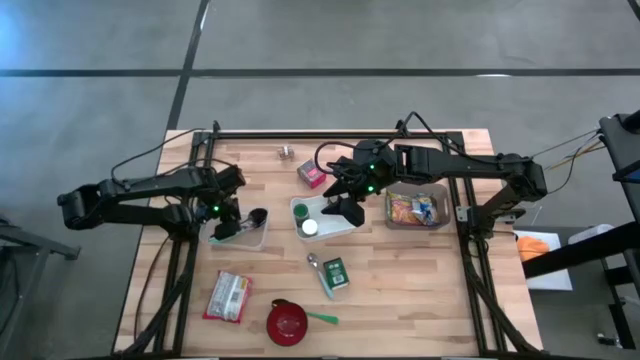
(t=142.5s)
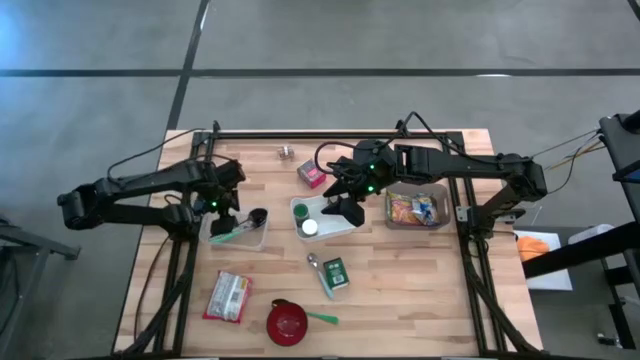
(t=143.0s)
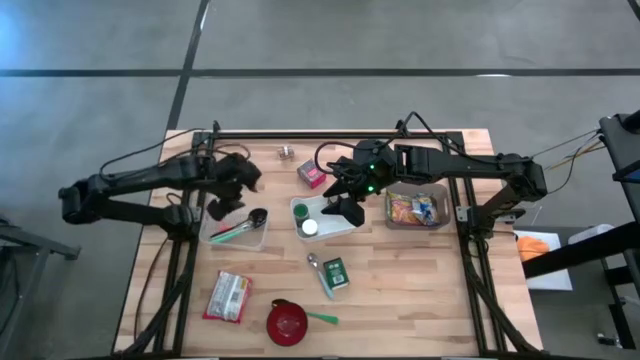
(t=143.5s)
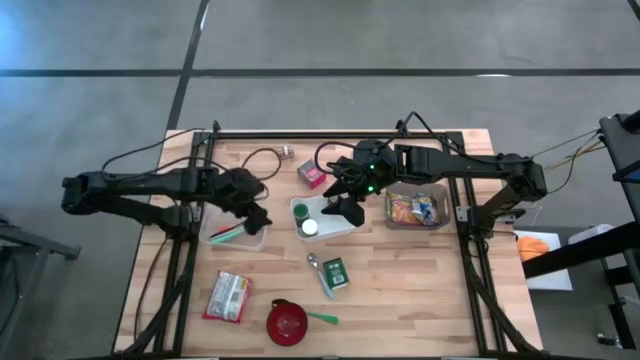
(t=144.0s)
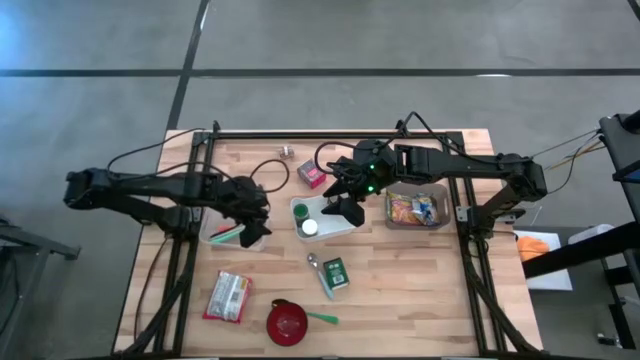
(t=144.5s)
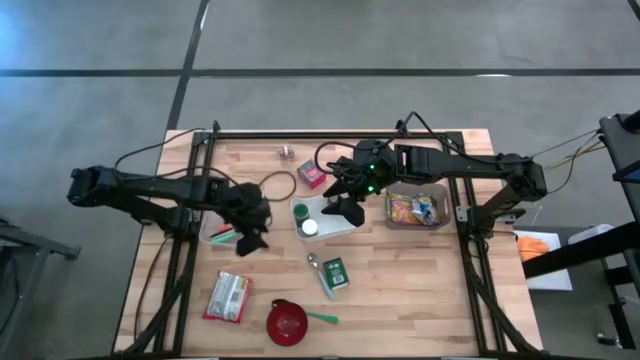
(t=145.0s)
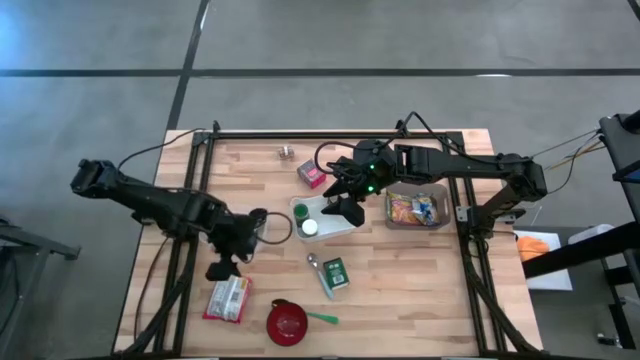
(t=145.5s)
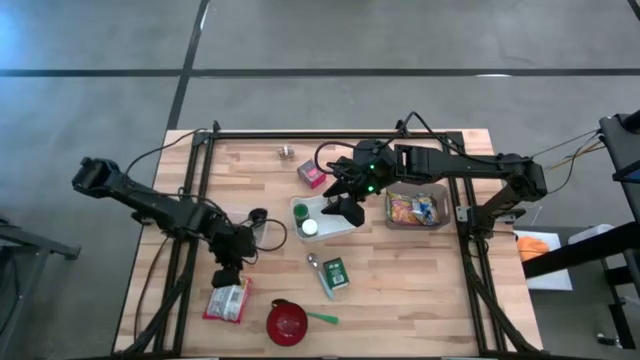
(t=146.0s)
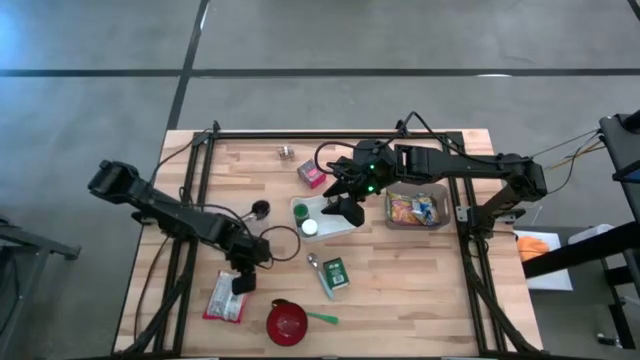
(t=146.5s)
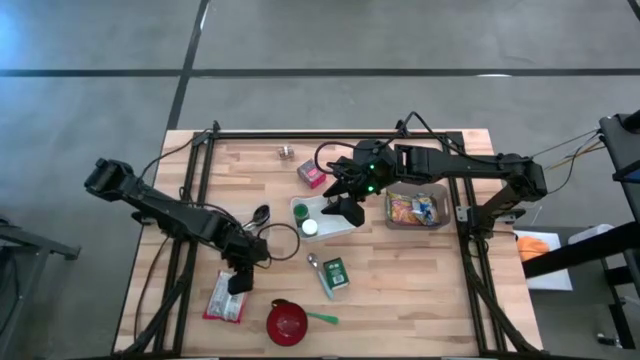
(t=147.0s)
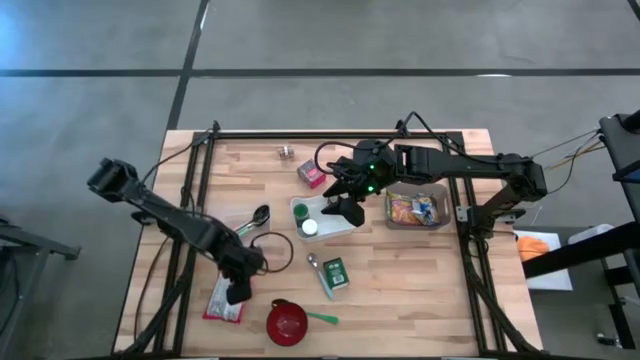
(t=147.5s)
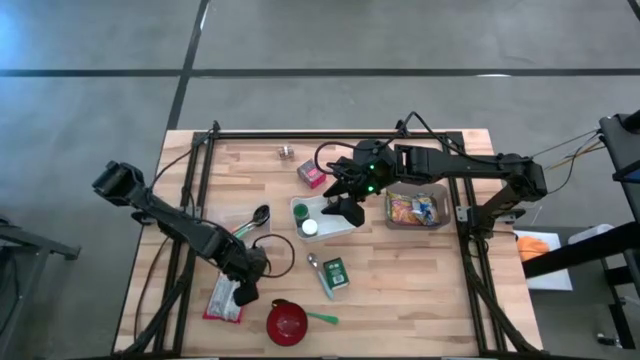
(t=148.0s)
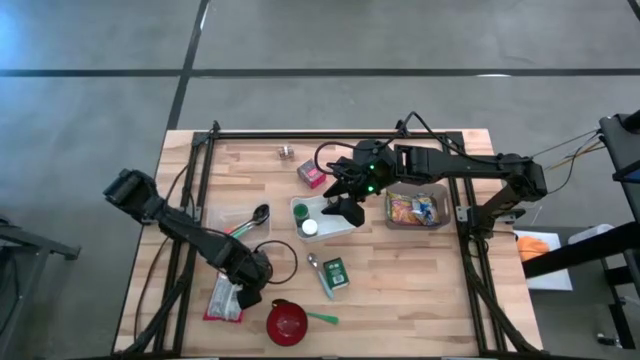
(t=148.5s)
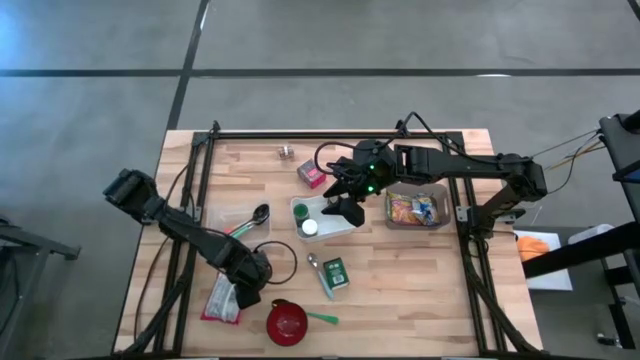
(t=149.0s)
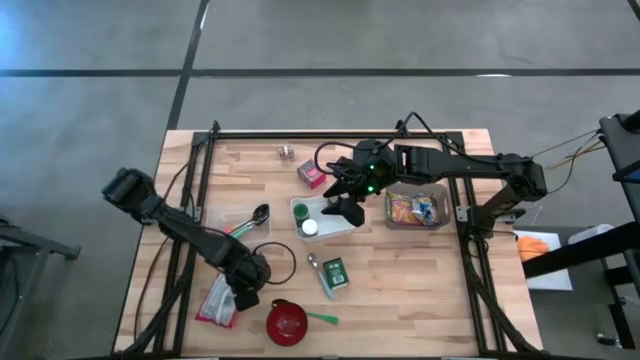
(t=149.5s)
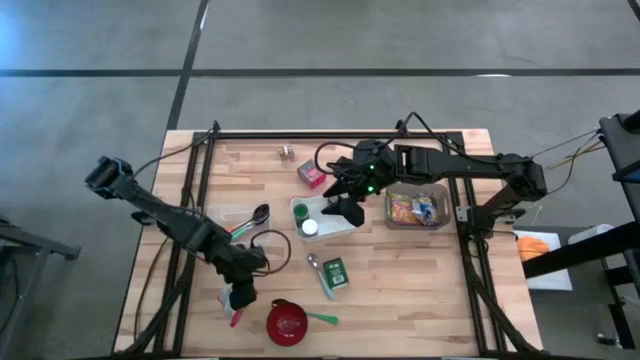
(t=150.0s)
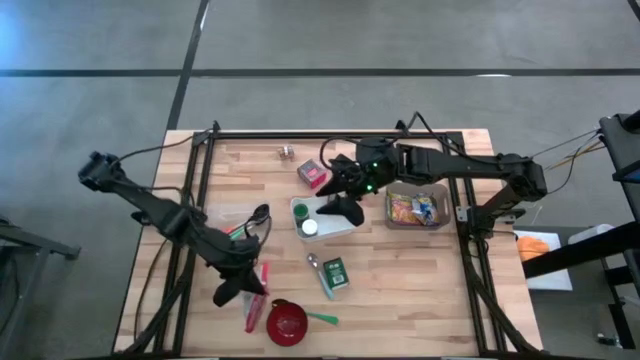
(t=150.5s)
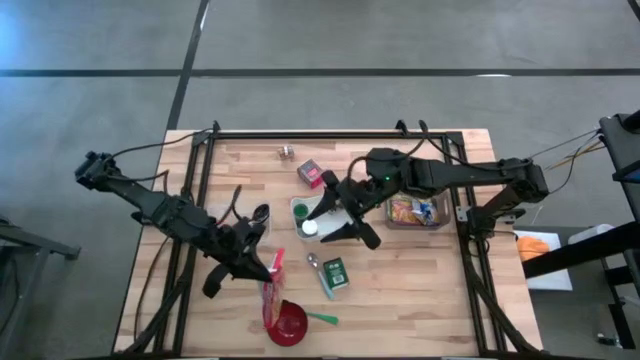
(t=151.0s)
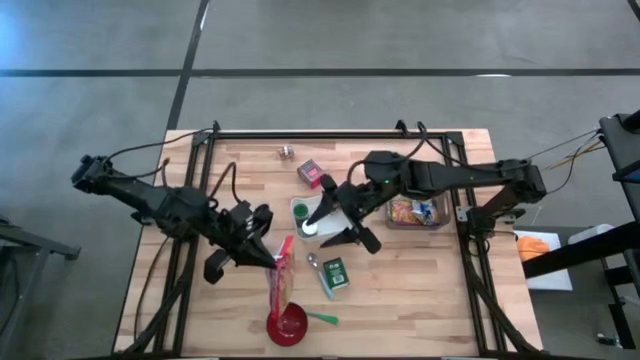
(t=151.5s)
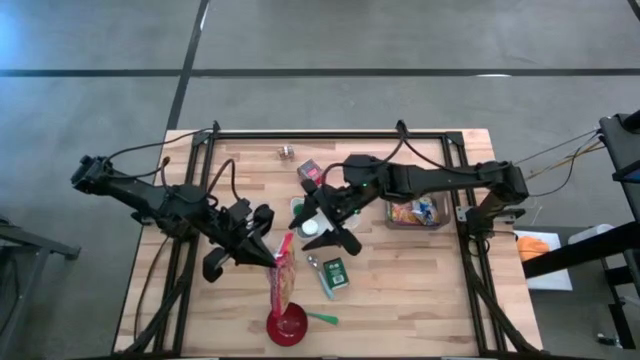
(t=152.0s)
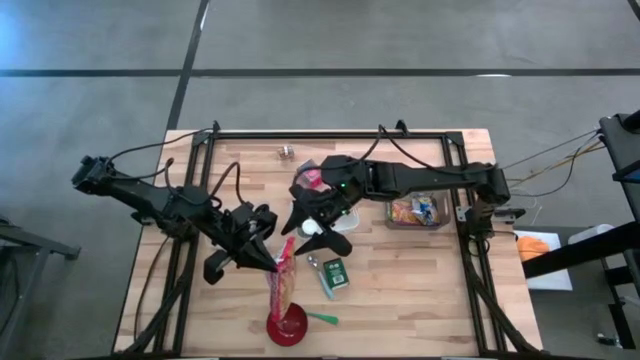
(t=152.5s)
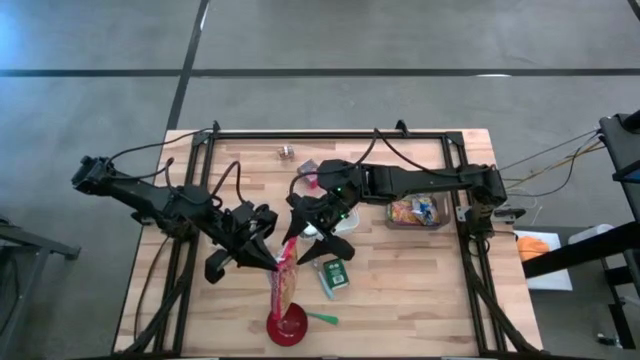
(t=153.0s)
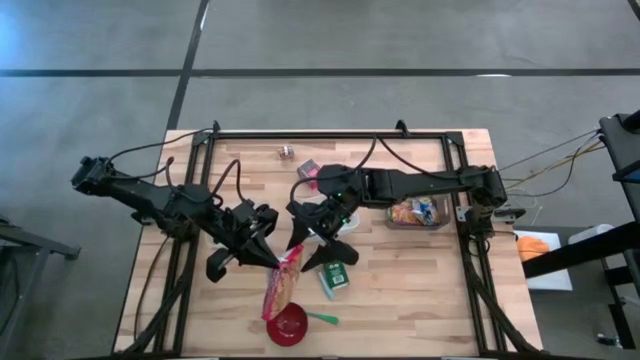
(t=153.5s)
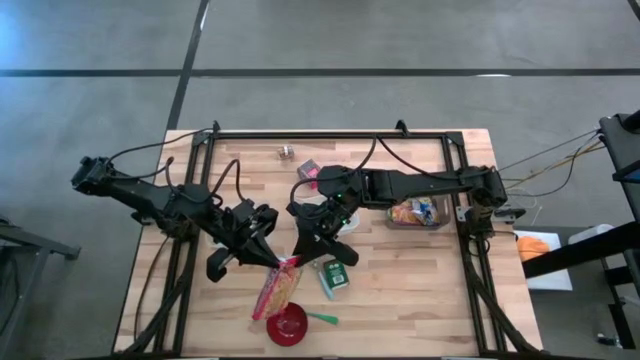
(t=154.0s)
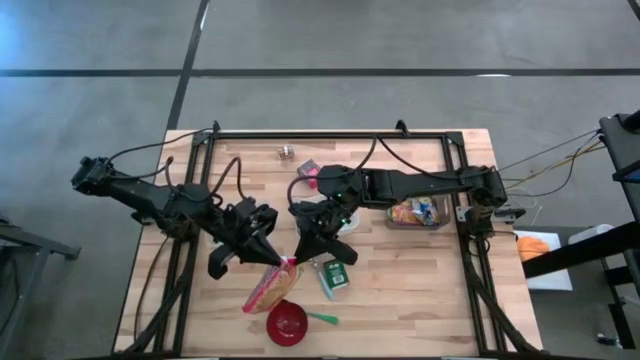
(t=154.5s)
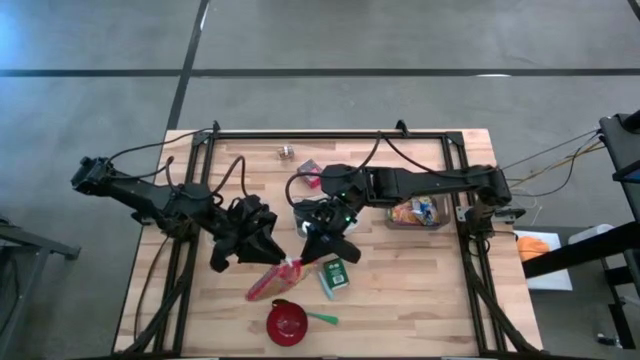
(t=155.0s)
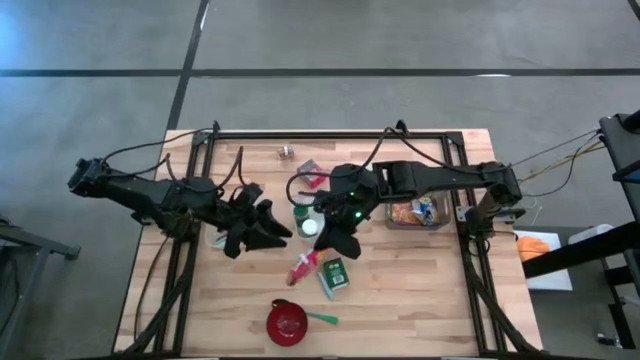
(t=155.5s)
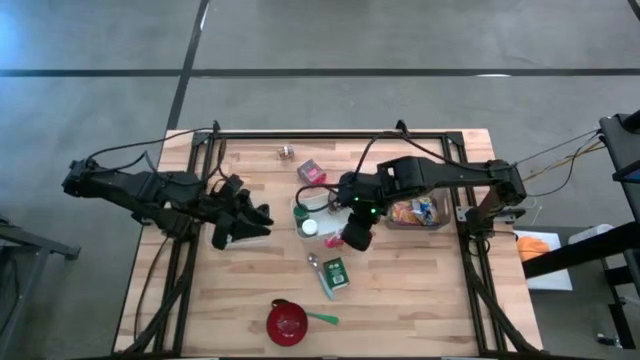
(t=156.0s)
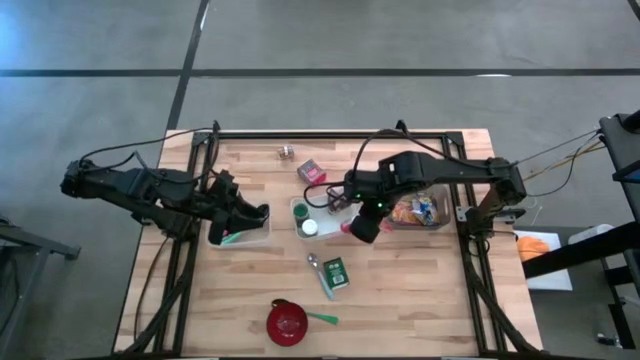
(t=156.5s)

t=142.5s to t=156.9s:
Put the red noodle pack into the black bin

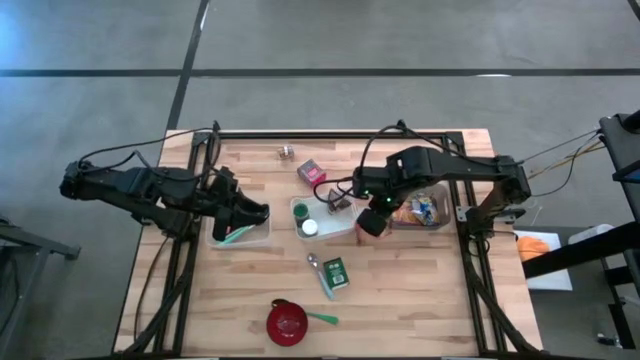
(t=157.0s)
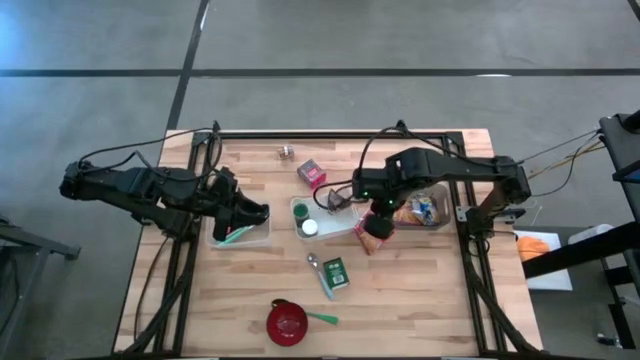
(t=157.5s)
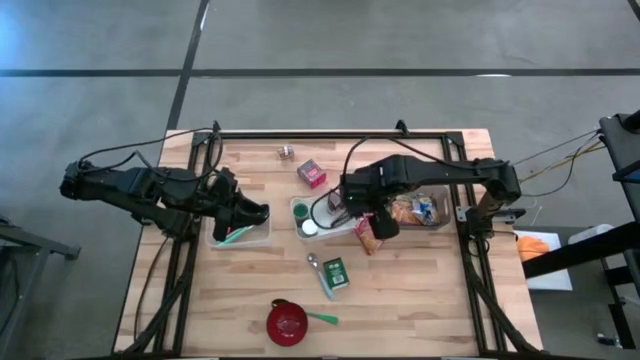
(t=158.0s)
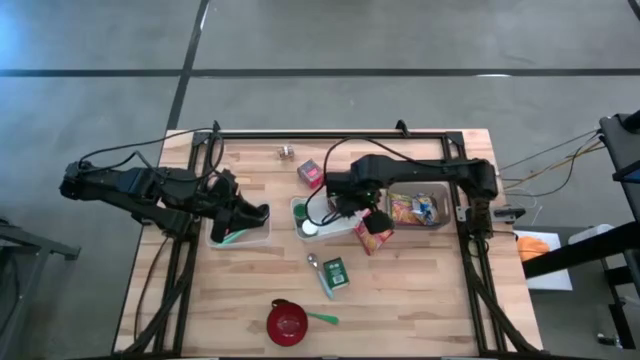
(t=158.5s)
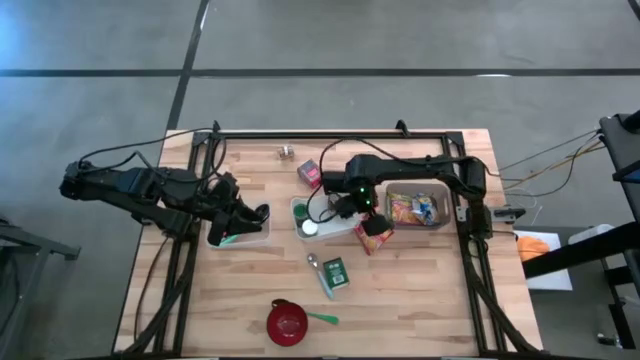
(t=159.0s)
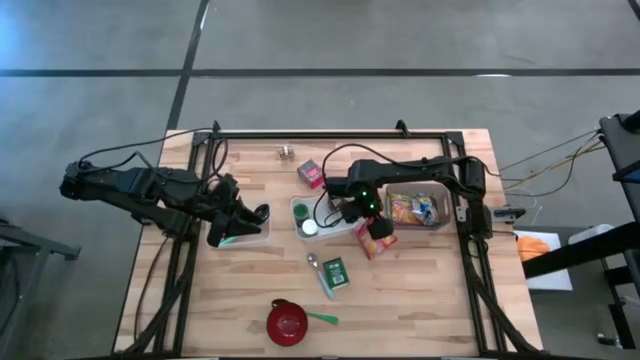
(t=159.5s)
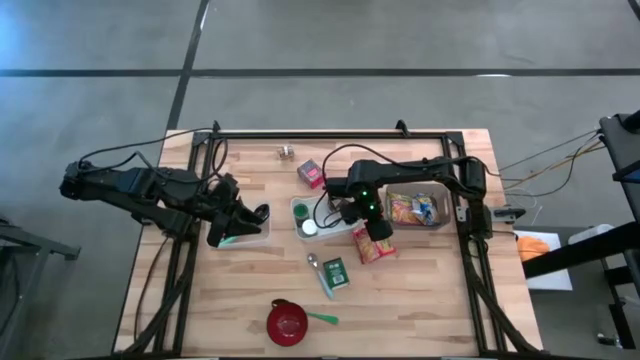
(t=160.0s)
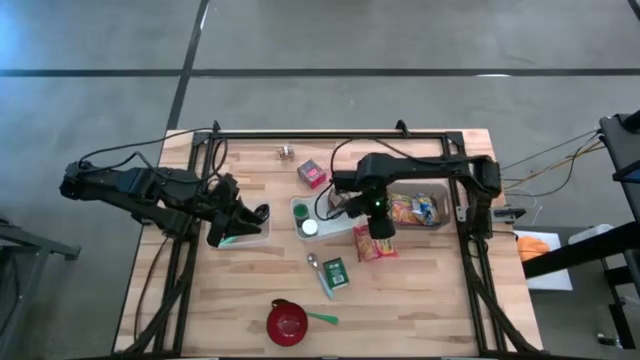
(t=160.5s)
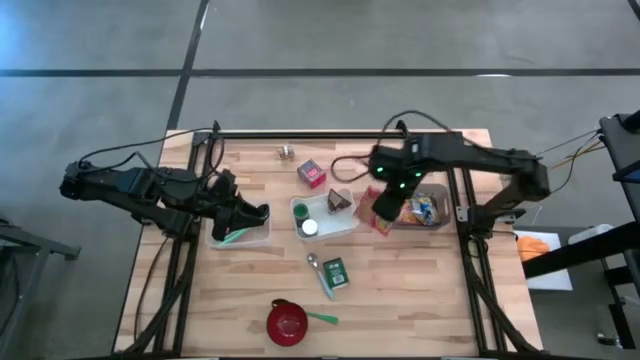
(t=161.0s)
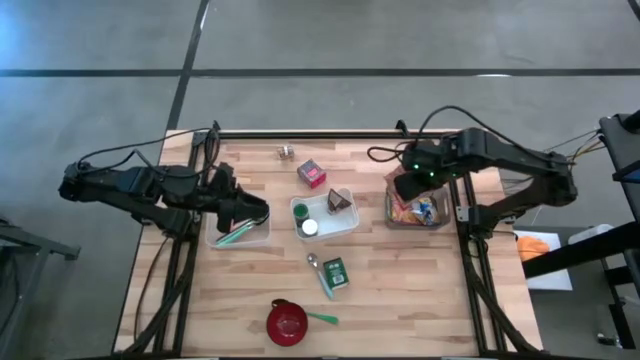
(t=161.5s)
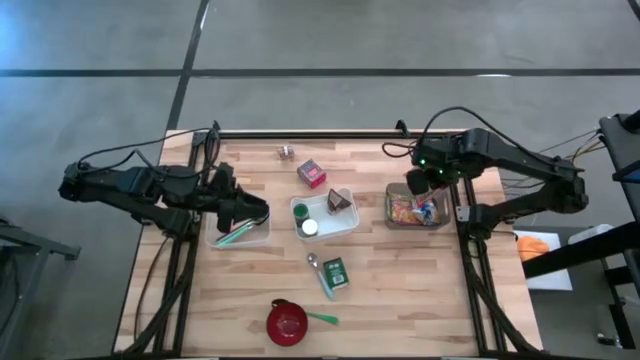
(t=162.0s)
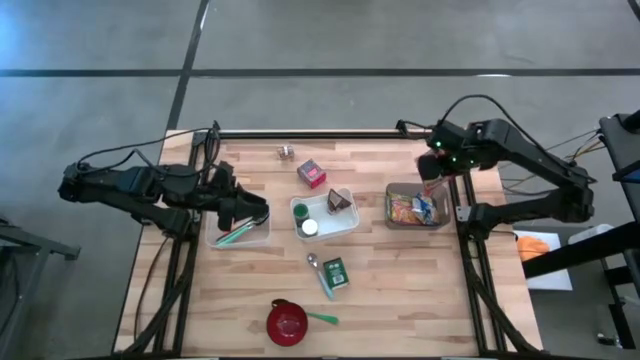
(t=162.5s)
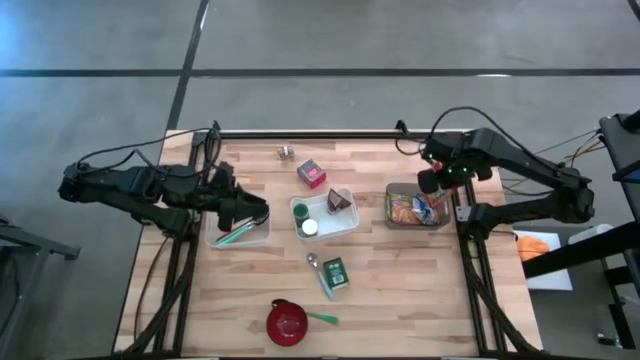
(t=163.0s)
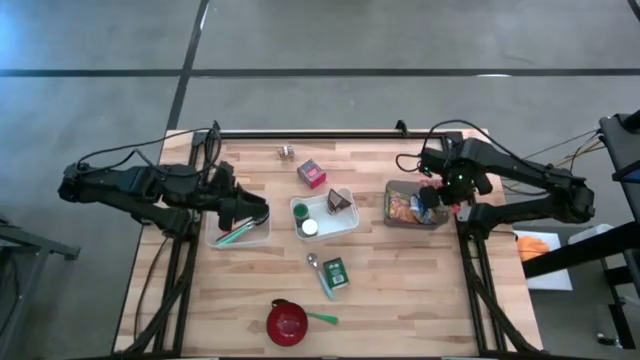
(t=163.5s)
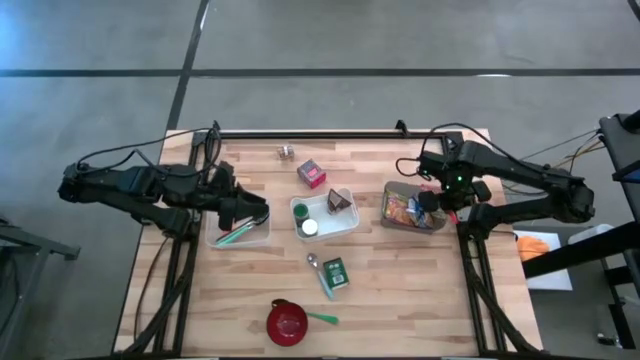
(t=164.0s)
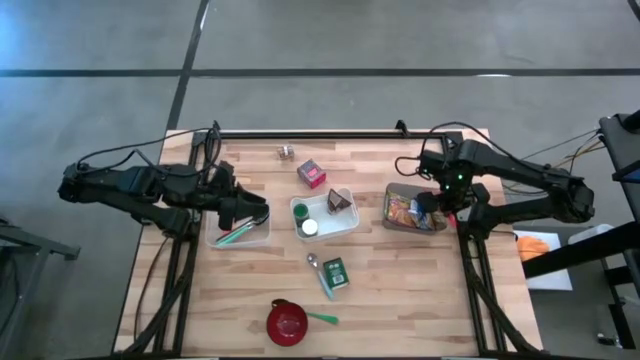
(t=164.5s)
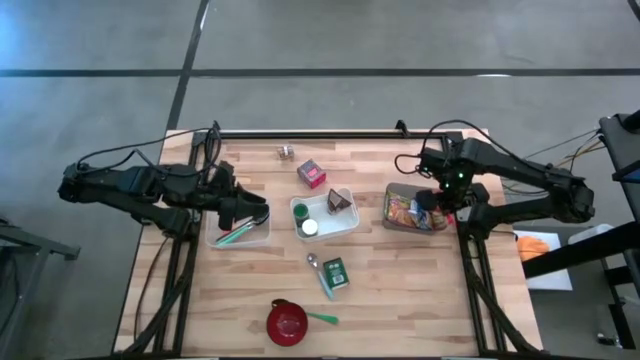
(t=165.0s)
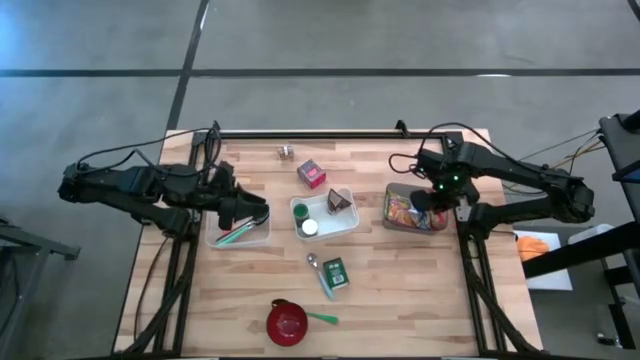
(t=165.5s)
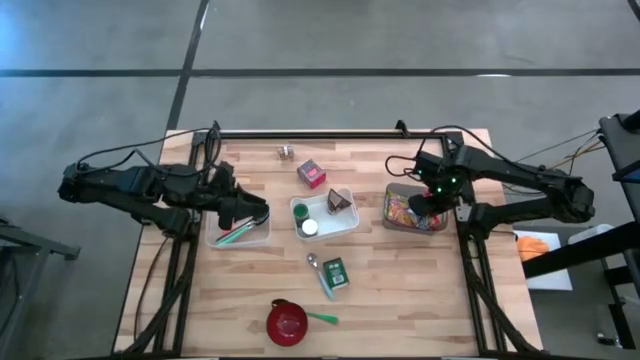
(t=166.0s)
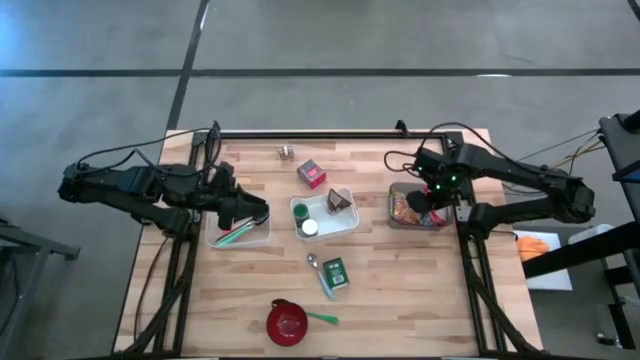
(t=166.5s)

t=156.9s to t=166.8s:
Put the red noodle pack into the black bin
